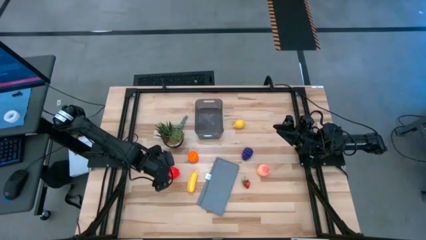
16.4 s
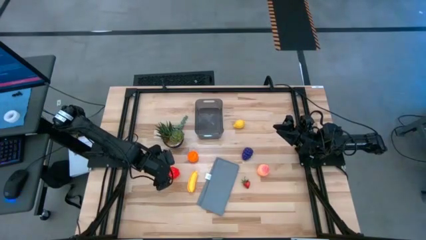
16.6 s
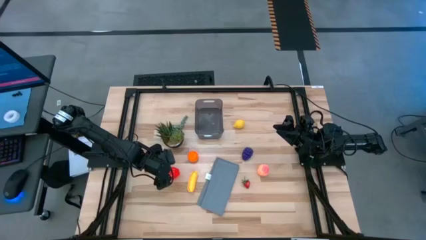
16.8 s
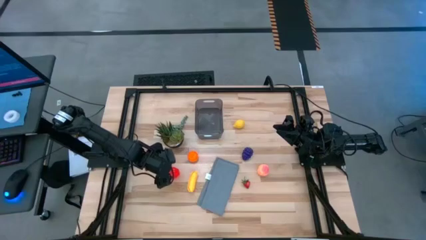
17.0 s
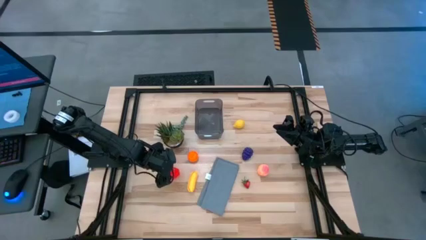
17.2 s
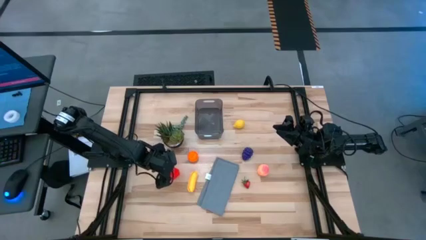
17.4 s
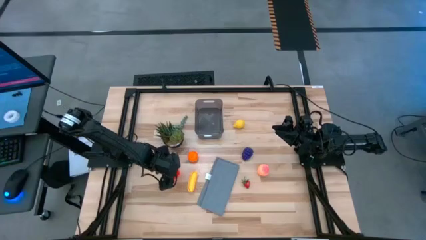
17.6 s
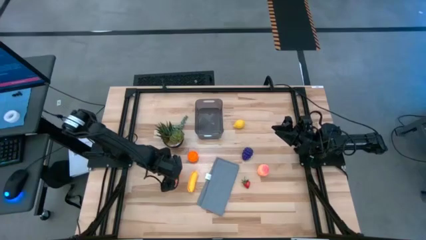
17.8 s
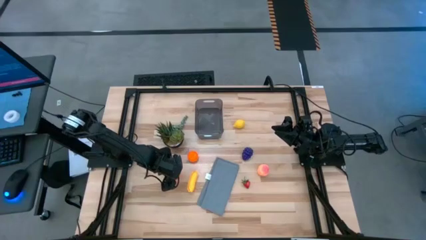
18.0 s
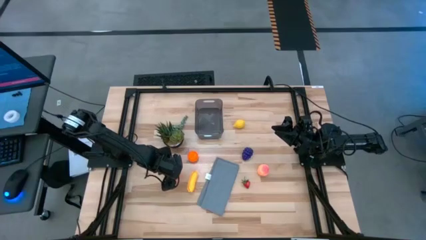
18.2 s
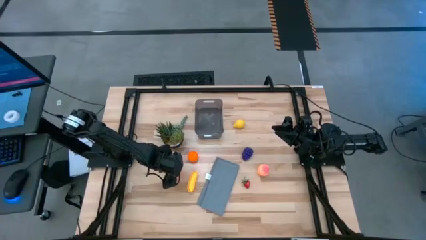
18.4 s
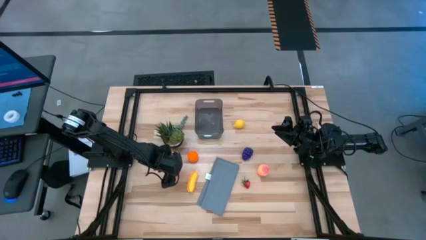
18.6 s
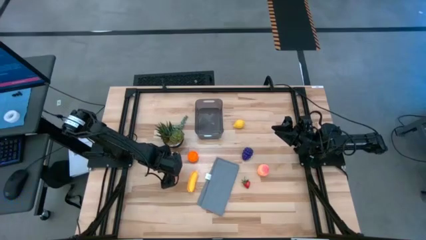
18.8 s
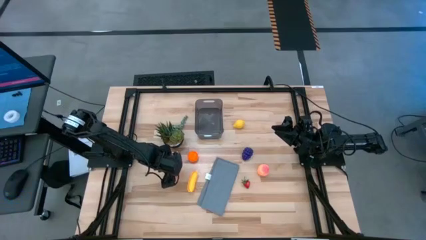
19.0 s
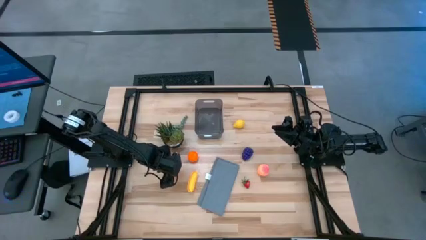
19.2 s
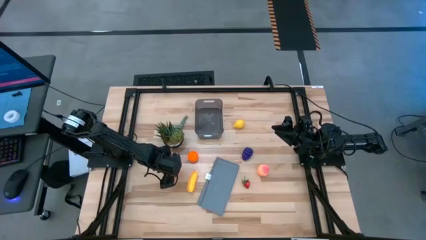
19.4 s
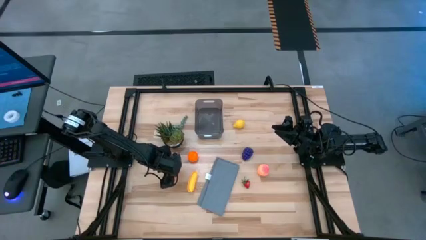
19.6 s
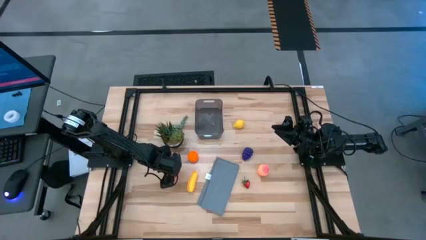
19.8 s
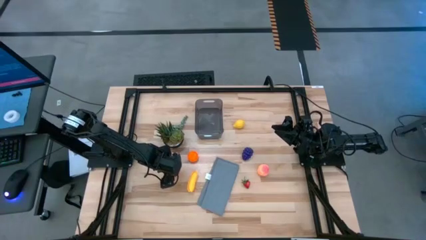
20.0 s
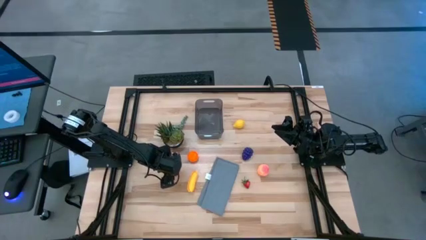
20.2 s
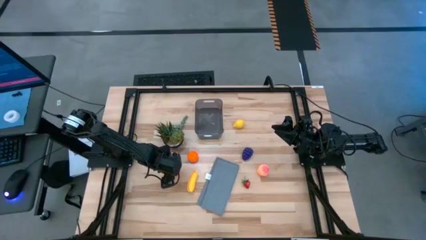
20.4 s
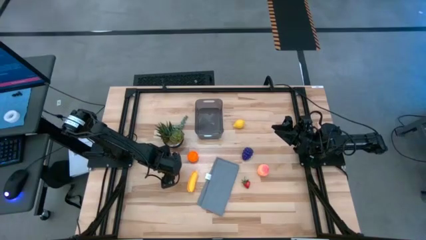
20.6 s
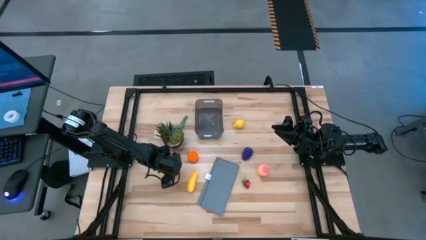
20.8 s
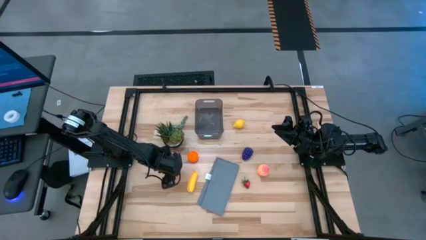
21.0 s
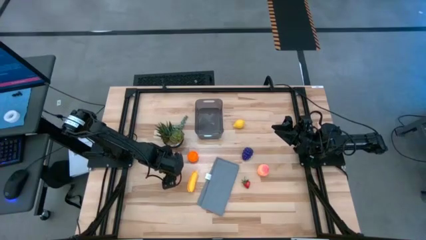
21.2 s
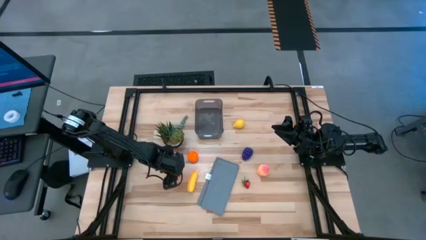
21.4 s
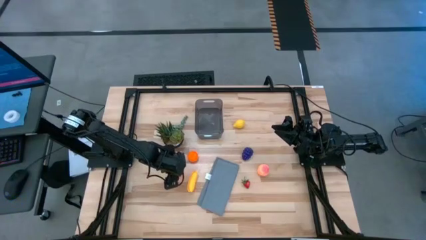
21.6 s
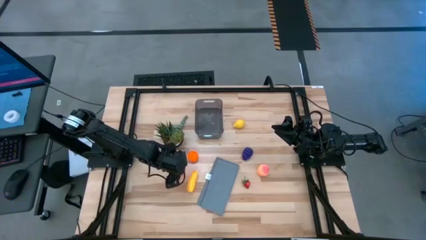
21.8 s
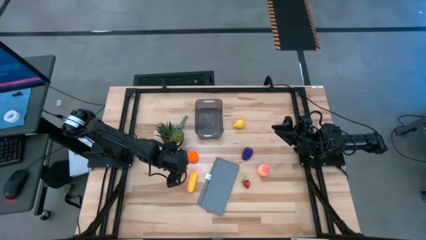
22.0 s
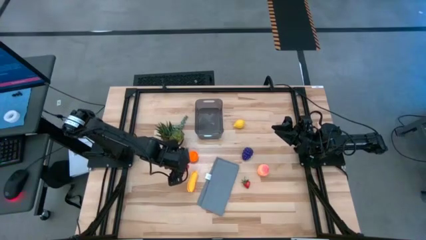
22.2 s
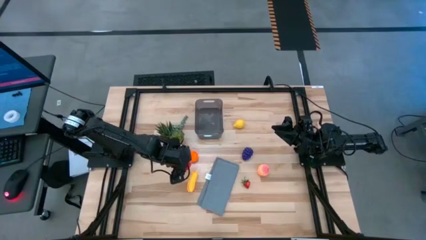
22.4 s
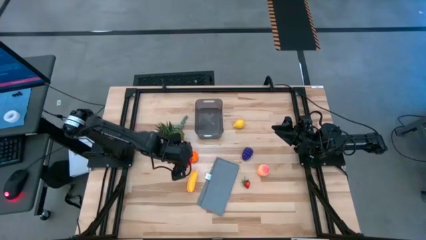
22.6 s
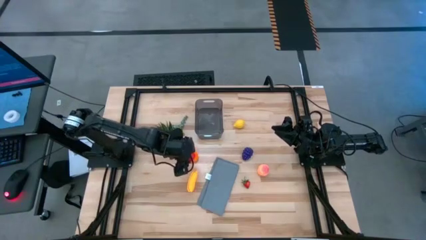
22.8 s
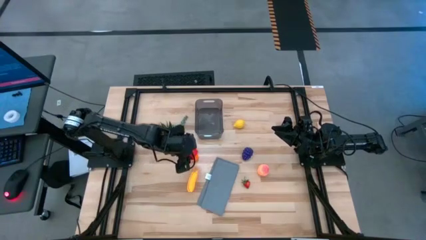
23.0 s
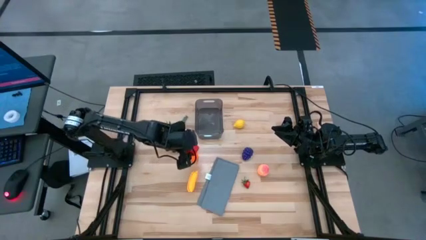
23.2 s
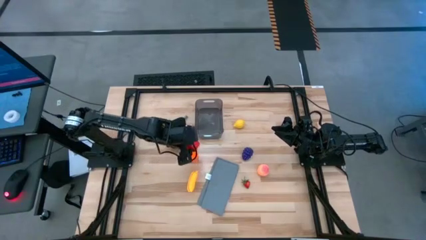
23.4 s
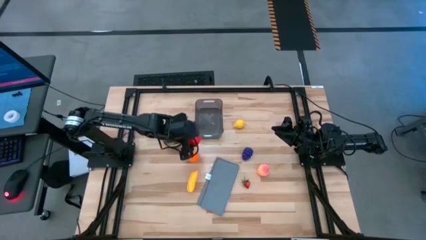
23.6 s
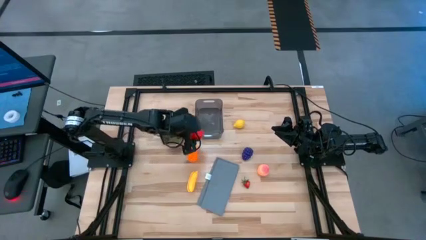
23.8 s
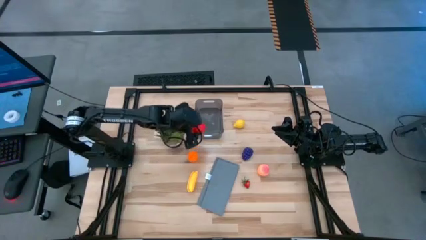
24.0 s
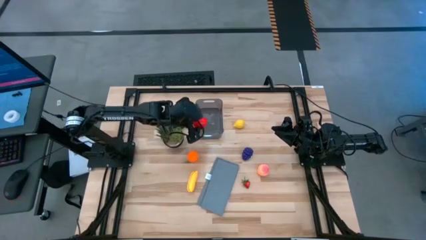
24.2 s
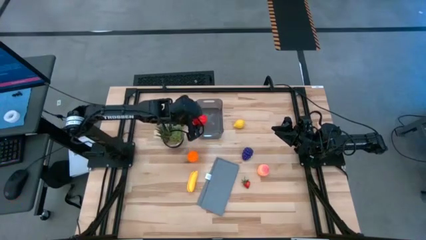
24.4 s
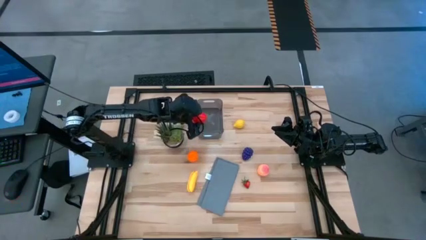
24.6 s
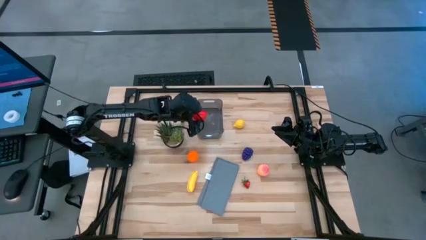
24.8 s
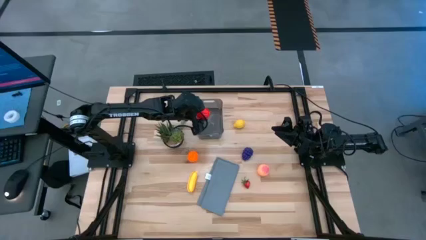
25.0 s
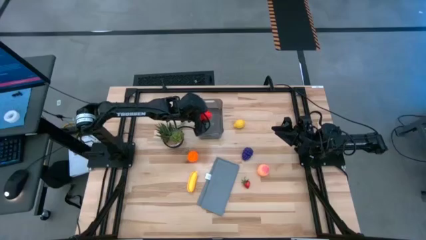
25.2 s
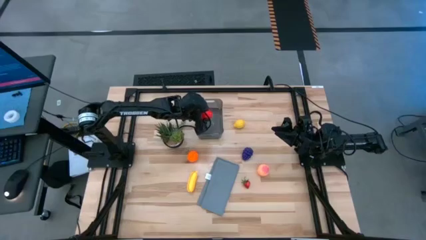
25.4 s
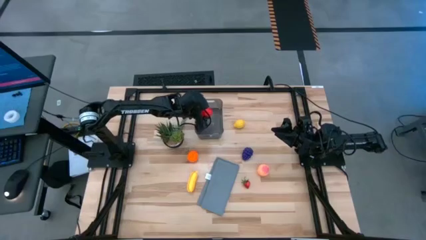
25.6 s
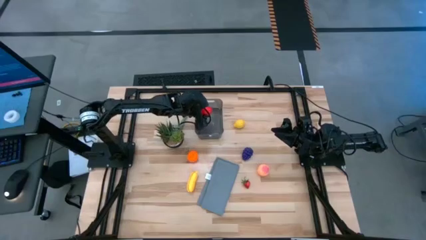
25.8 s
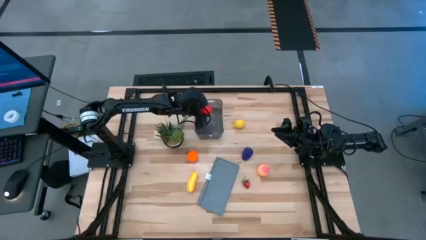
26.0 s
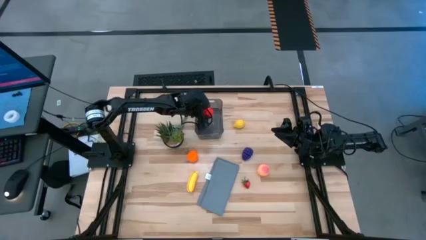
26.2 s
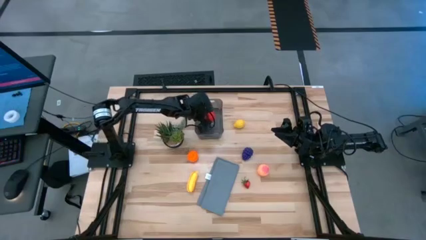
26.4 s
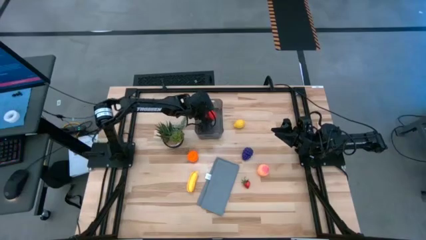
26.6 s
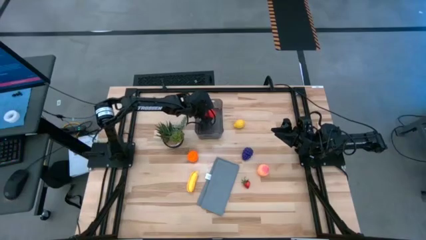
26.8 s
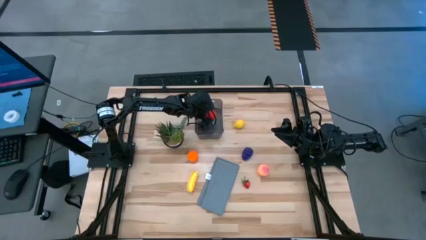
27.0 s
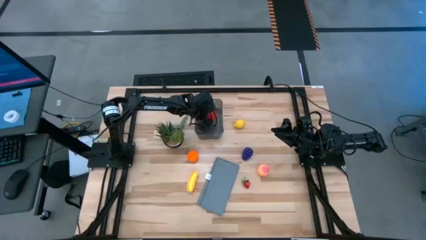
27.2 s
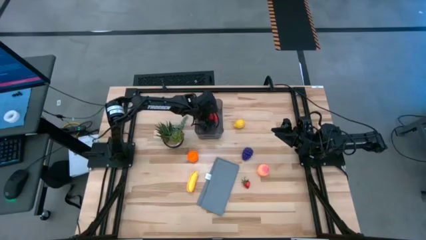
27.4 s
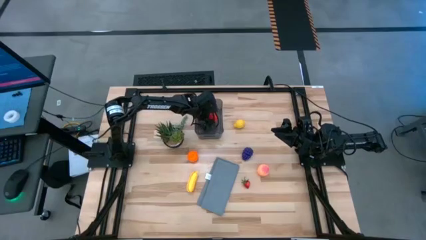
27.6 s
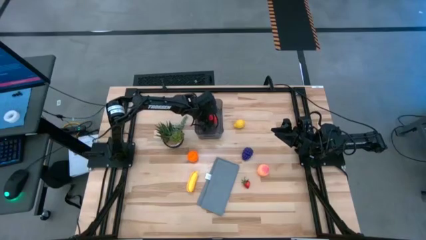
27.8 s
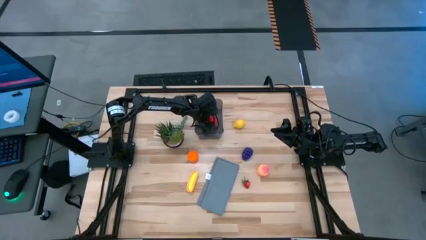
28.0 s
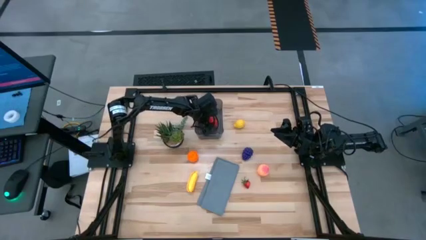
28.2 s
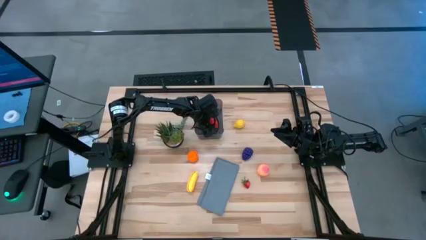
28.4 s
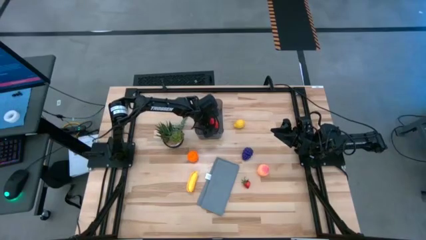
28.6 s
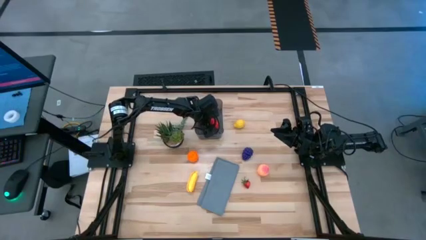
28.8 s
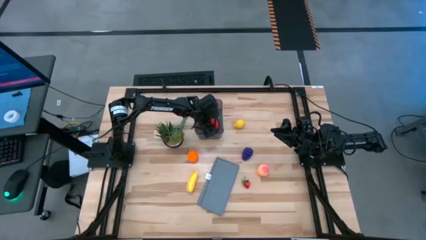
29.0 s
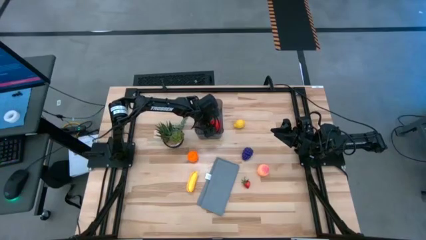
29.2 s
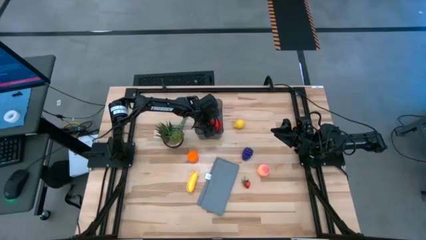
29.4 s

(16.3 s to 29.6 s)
Task: Pick and placing Produce into tupperware
Put the red apple into the black bin
